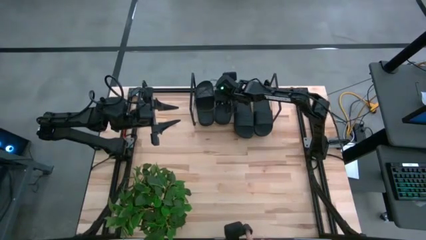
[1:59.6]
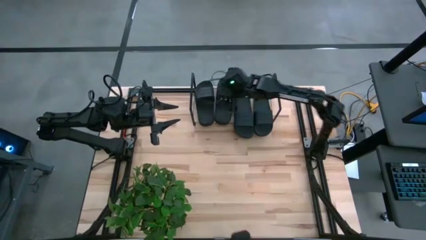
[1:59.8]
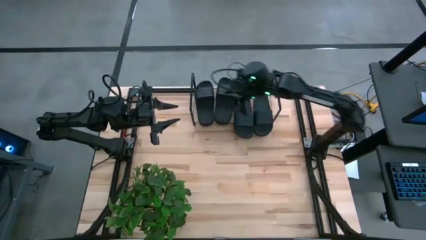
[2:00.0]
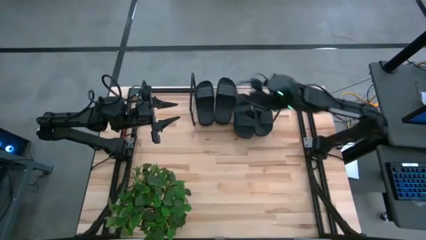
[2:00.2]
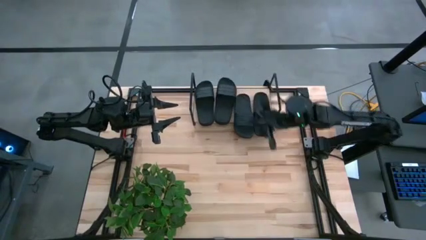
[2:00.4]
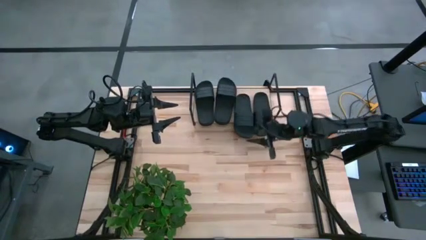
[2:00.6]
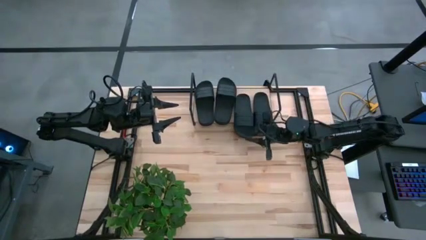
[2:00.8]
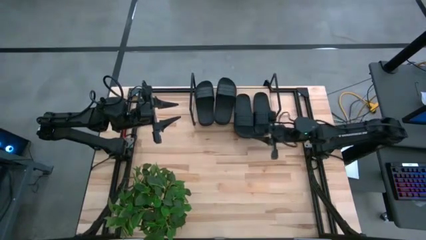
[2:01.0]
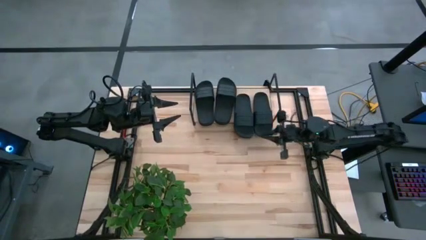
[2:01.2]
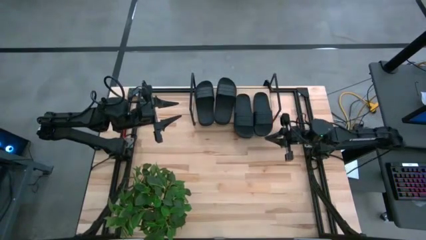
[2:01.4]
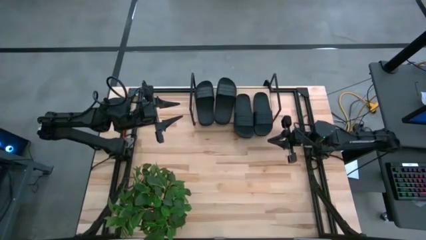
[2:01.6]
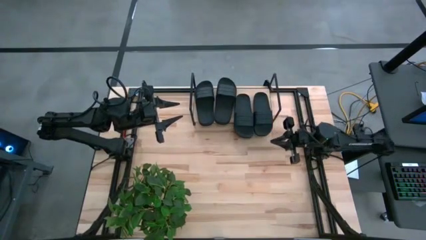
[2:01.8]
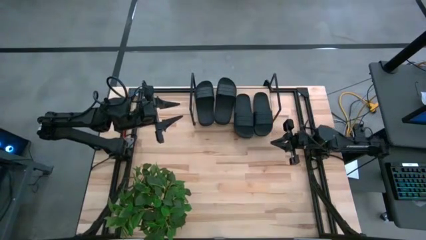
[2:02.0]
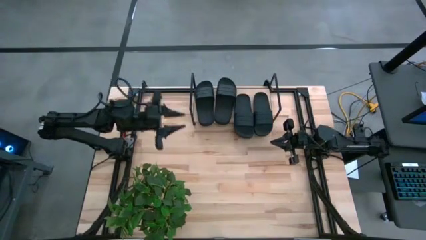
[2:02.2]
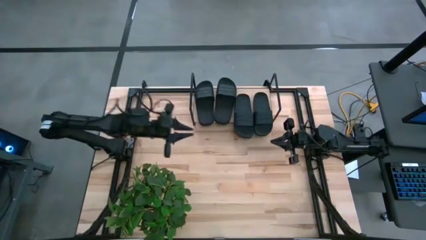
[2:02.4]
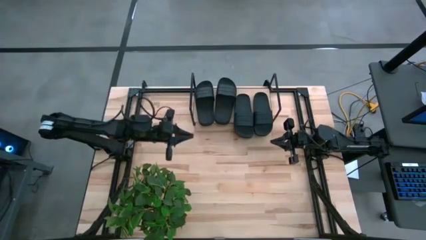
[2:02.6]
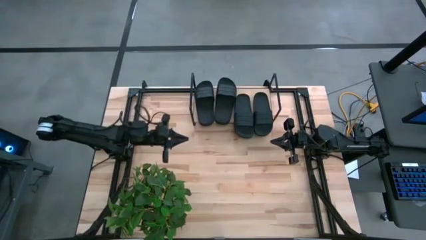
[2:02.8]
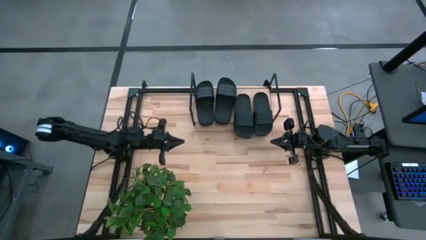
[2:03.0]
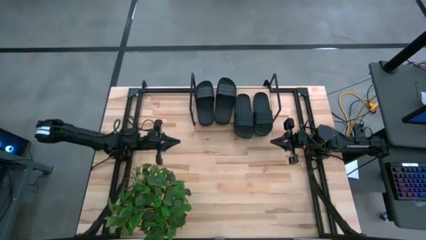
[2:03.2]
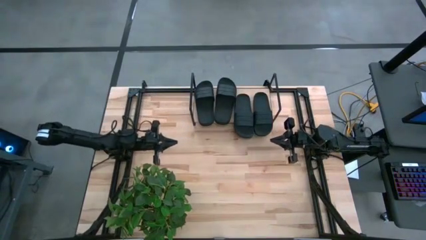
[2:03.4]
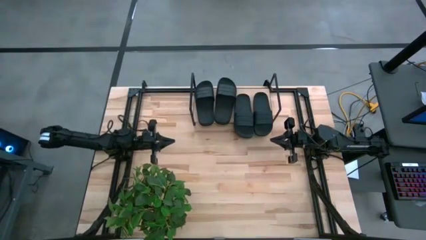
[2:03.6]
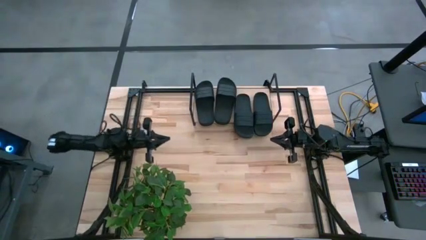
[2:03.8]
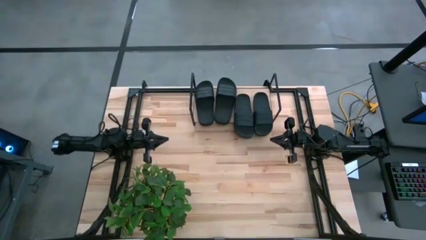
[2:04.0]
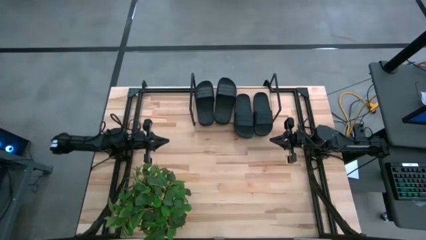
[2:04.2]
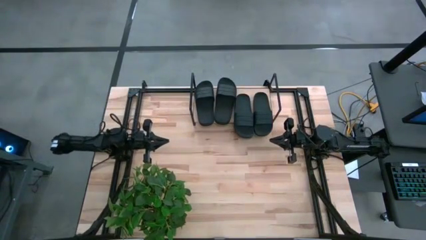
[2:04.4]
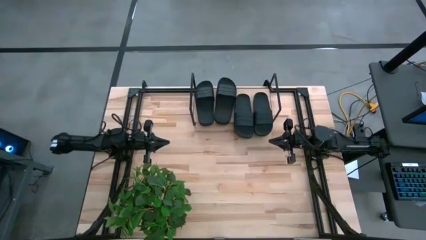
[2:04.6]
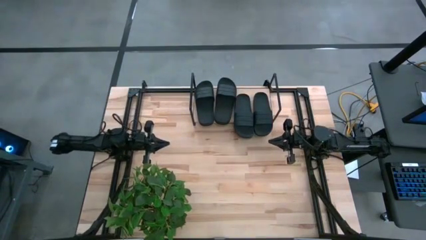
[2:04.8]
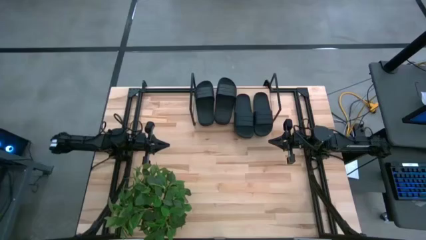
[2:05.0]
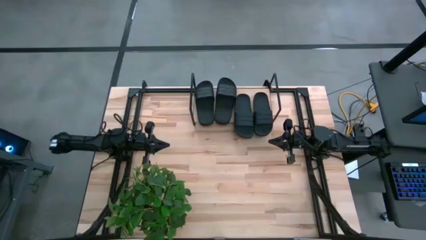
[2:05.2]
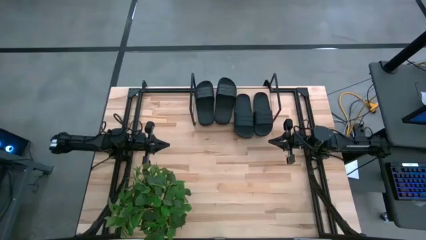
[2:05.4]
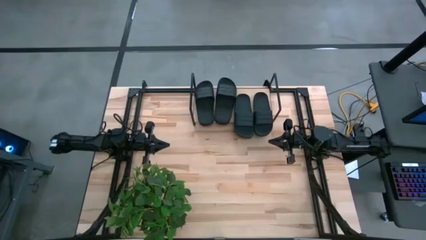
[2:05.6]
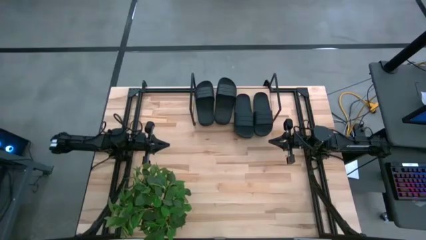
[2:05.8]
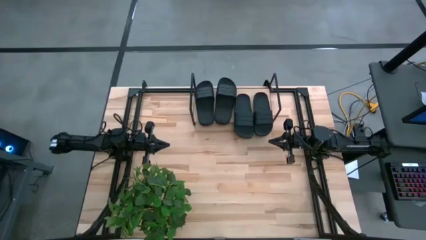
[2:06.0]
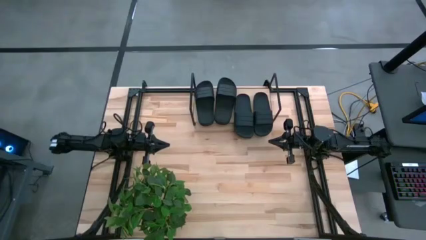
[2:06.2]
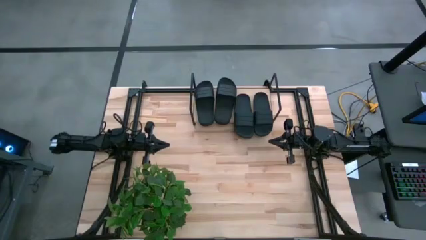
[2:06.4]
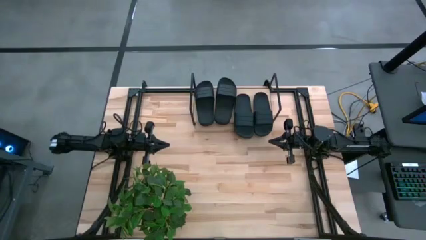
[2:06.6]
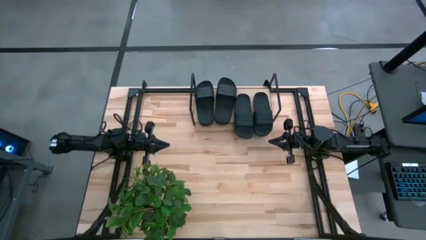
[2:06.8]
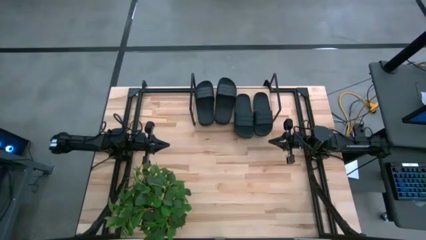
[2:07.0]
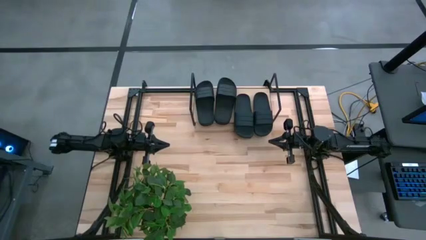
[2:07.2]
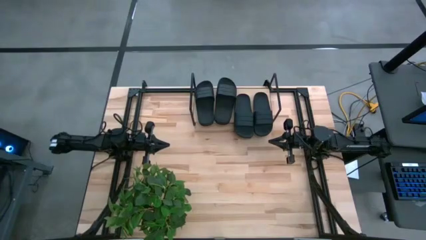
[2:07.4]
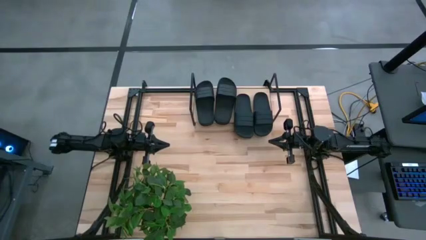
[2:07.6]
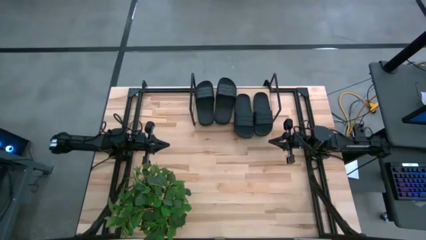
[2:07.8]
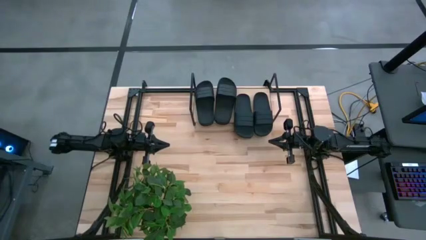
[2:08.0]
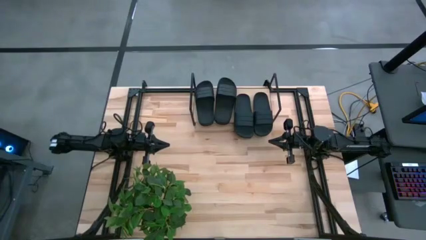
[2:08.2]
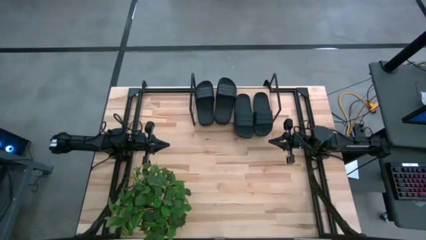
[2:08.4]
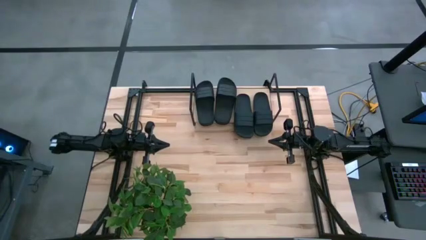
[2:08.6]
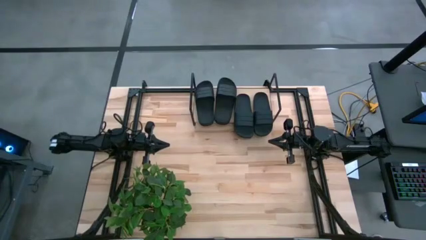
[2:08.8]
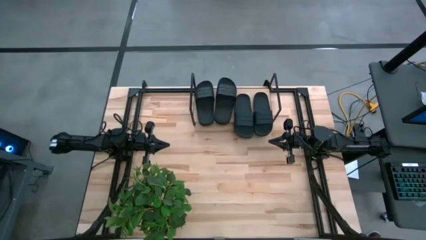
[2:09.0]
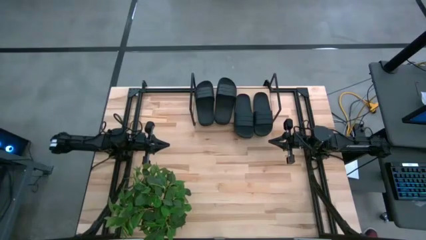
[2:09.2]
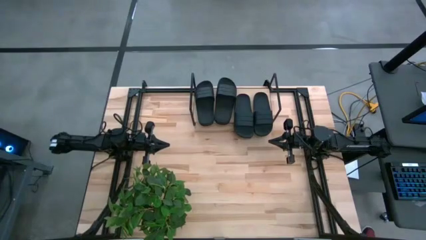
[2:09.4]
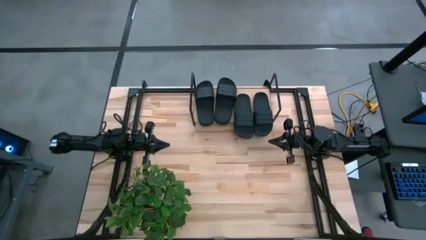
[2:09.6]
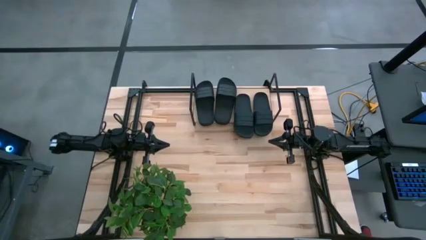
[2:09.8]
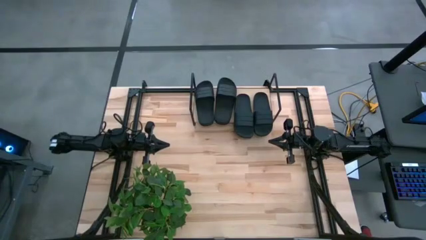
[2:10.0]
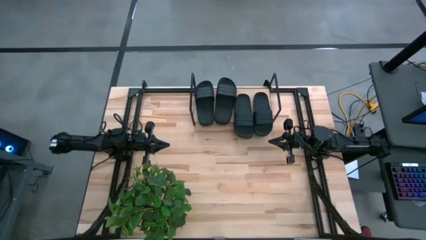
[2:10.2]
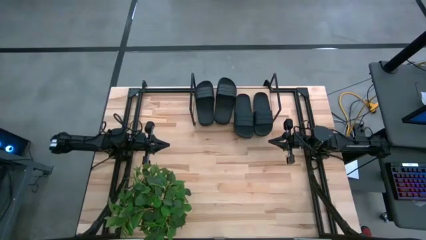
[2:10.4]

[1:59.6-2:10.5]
Task: Pick and place slides into the shelf
Return to Home Position

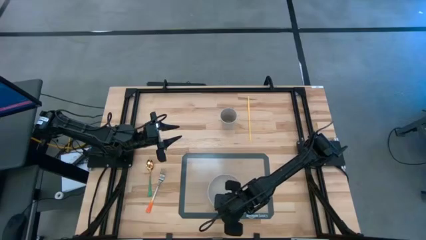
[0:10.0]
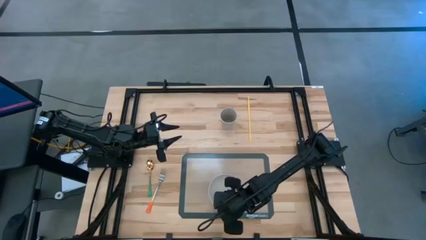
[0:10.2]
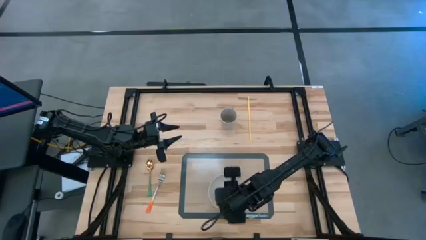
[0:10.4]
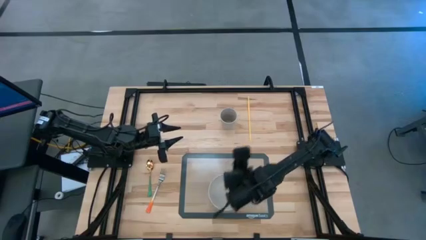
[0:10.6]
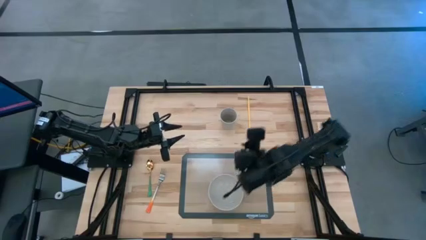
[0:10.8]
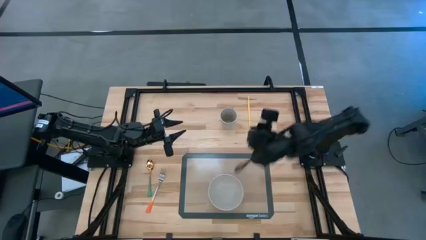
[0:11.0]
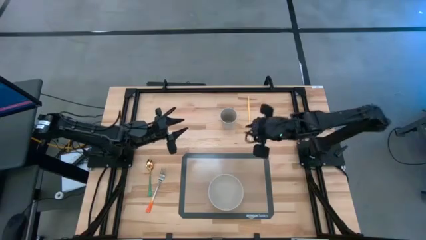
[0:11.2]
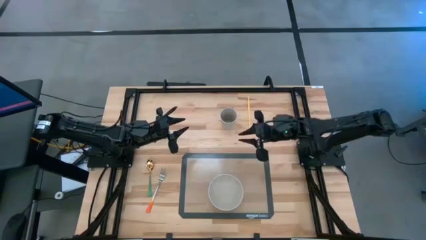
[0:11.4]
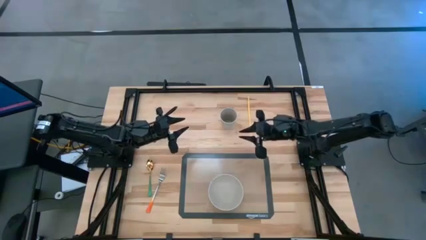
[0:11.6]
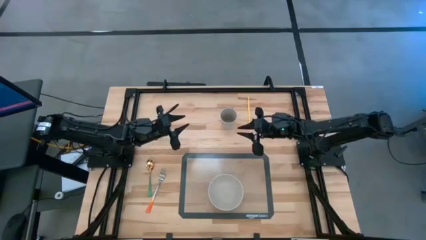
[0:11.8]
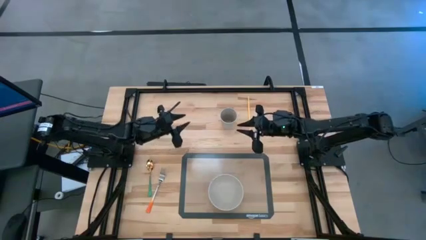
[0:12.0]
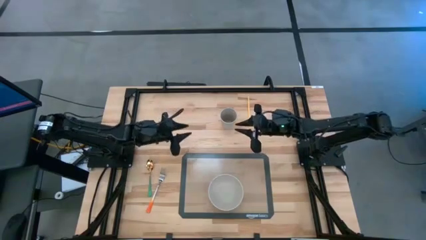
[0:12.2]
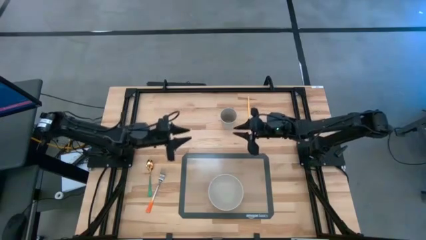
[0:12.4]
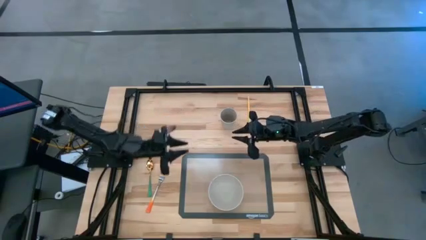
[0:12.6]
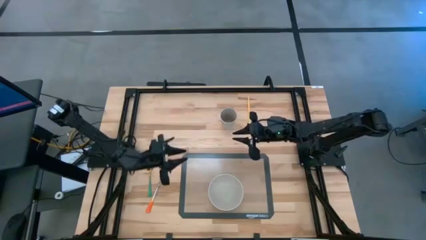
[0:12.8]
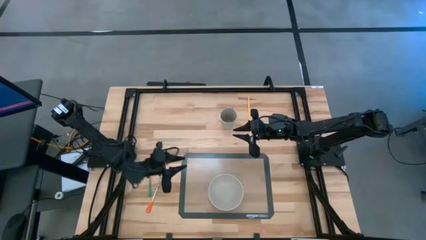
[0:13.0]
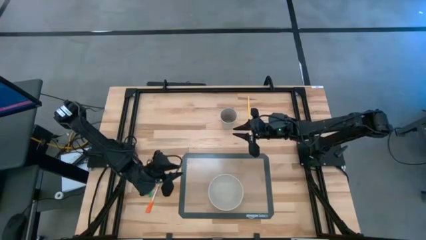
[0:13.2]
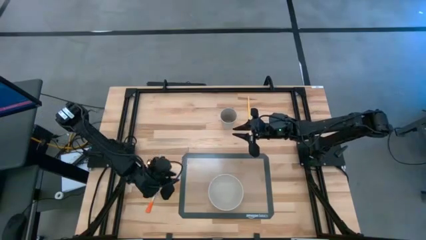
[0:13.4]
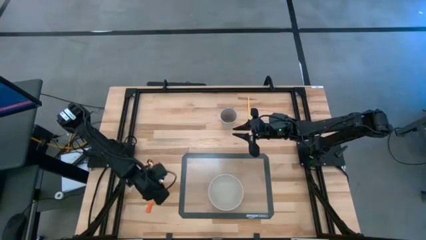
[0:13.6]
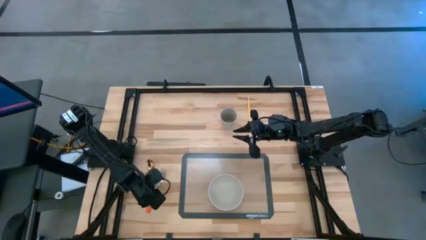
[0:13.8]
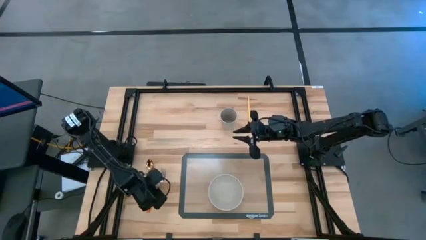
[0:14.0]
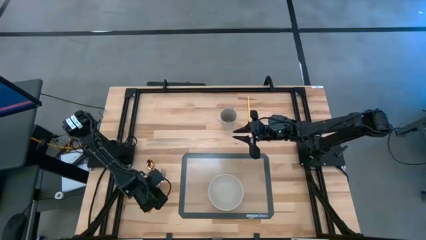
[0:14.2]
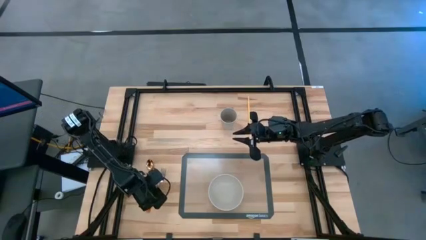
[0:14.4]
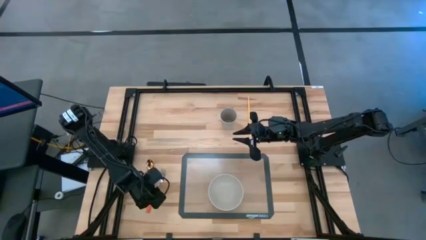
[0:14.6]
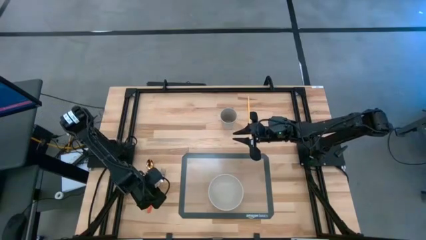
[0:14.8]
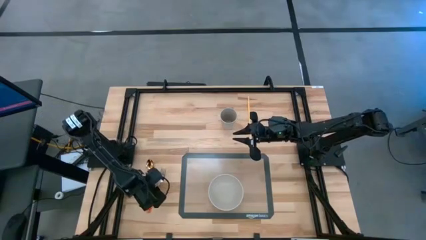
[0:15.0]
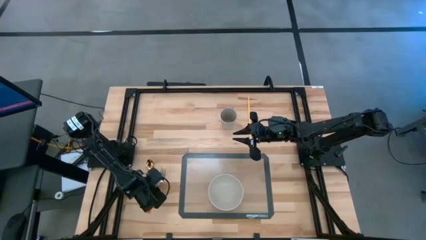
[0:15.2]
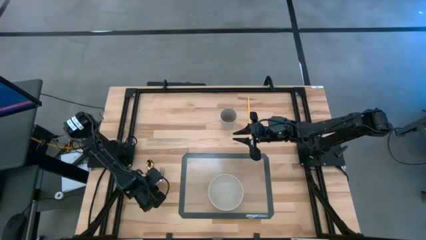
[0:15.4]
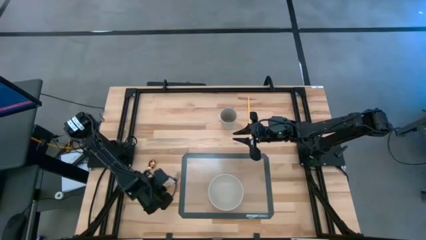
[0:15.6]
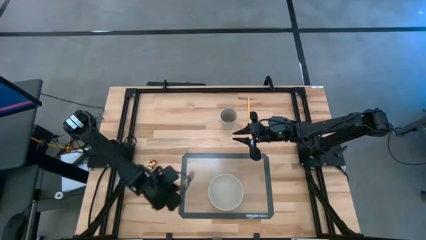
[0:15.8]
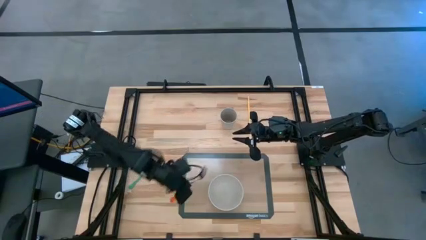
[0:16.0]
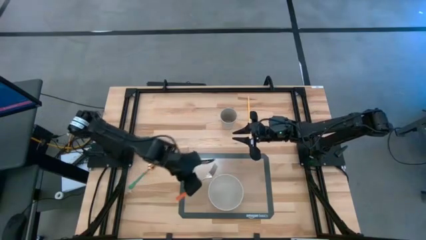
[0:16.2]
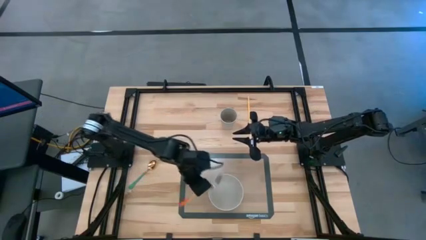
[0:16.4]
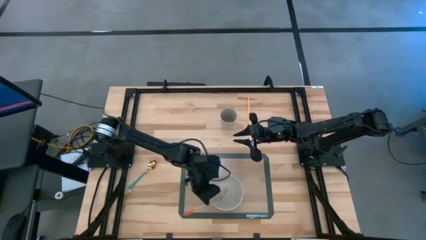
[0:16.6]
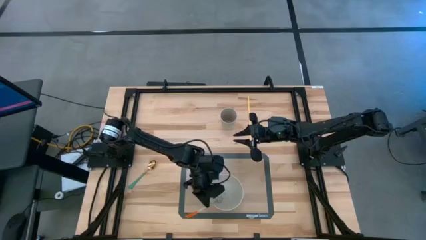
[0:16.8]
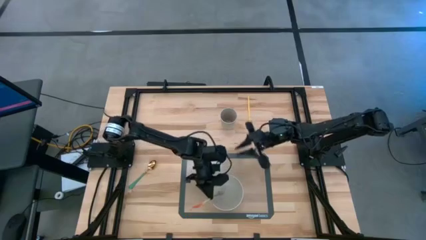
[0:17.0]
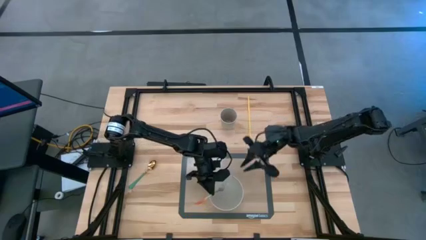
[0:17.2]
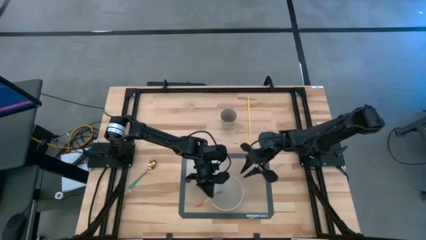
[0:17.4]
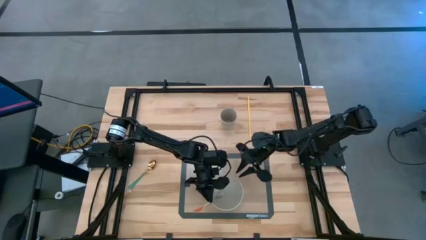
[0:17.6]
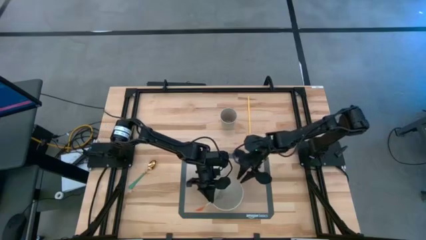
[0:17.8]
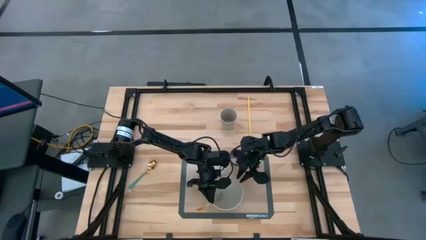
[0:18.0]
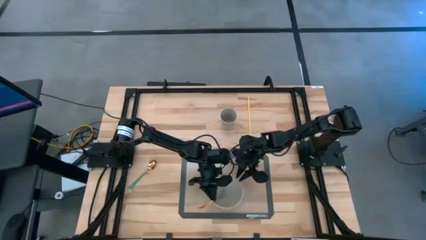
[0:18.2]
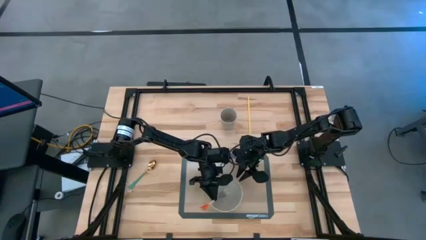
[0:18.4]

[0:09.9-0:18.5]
Task: Pick & Place Utensil
Put the orange fork into the gray bowl on the brown mat
